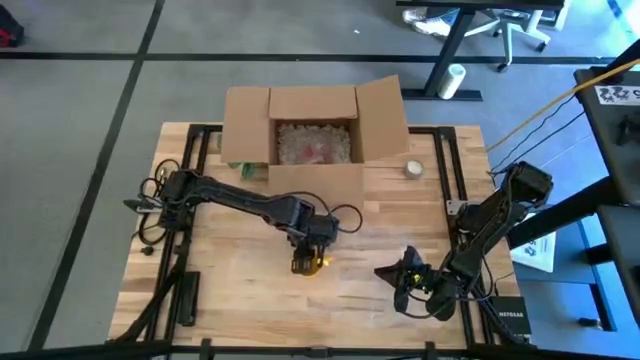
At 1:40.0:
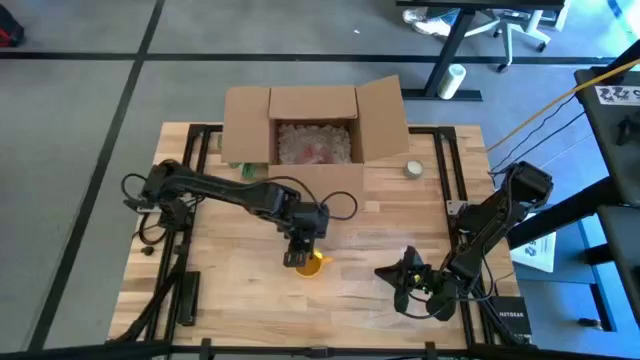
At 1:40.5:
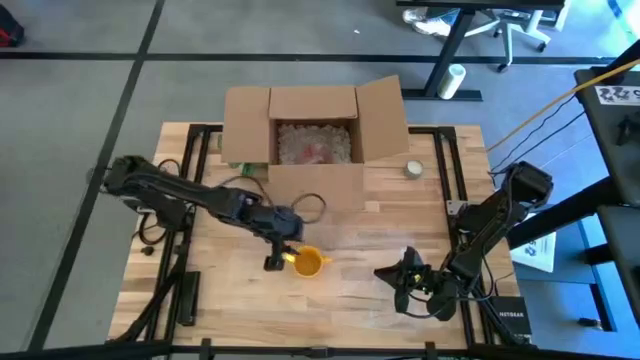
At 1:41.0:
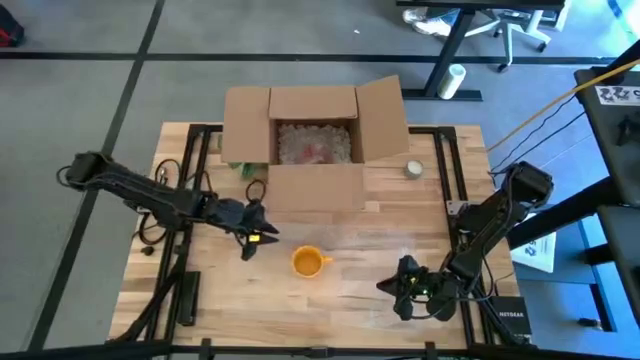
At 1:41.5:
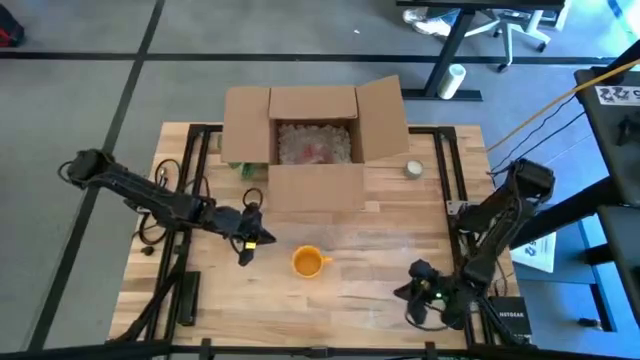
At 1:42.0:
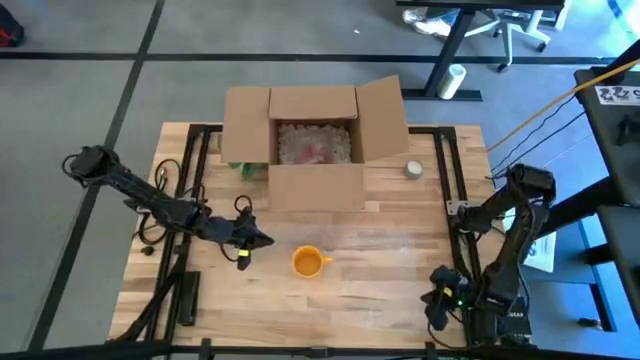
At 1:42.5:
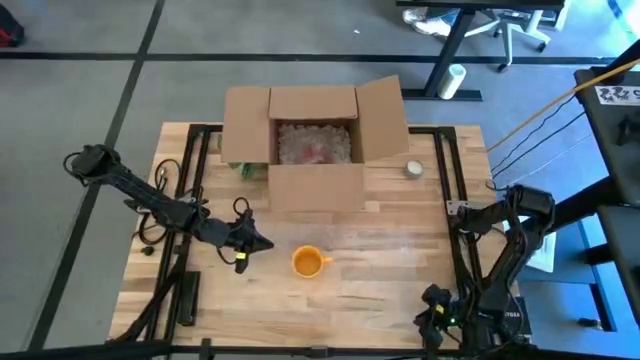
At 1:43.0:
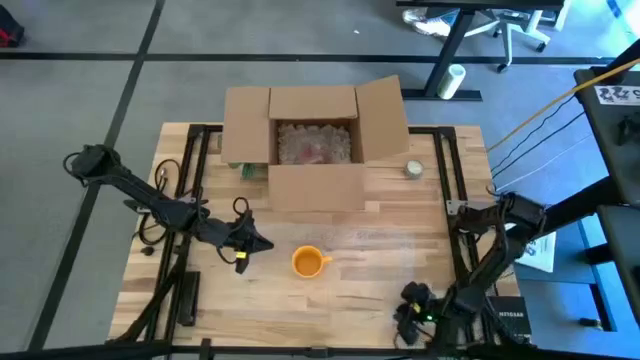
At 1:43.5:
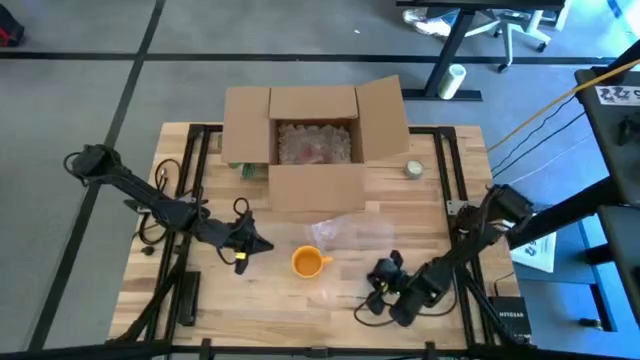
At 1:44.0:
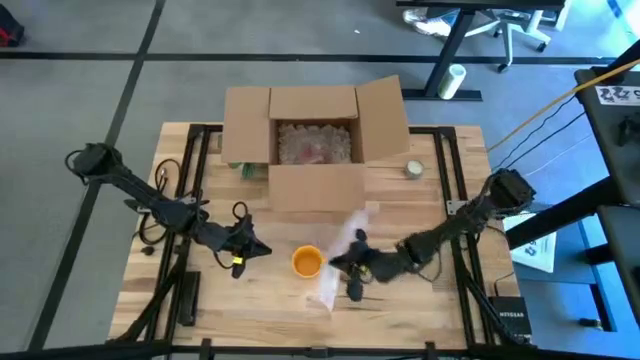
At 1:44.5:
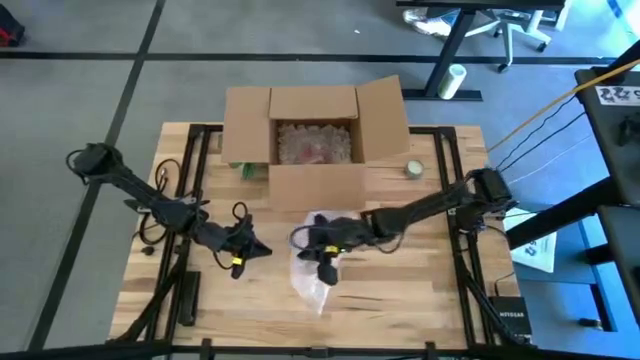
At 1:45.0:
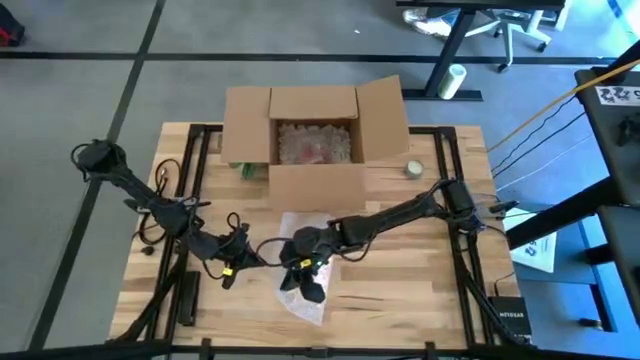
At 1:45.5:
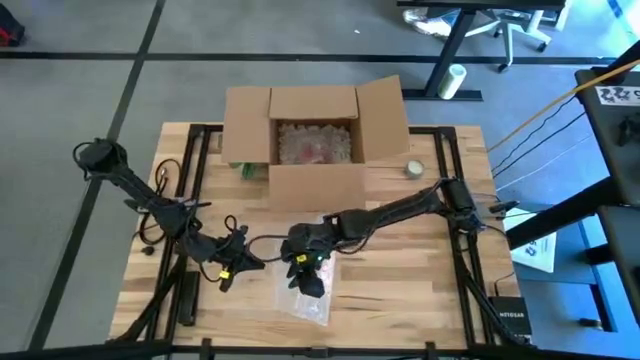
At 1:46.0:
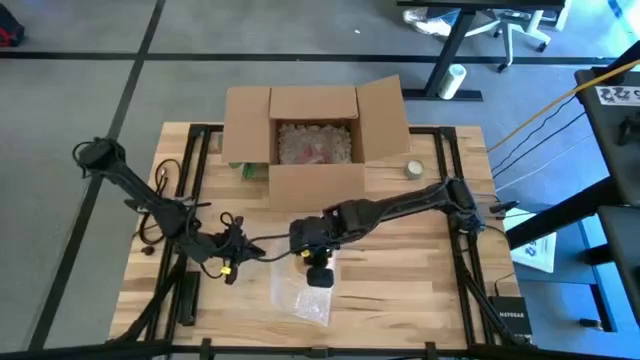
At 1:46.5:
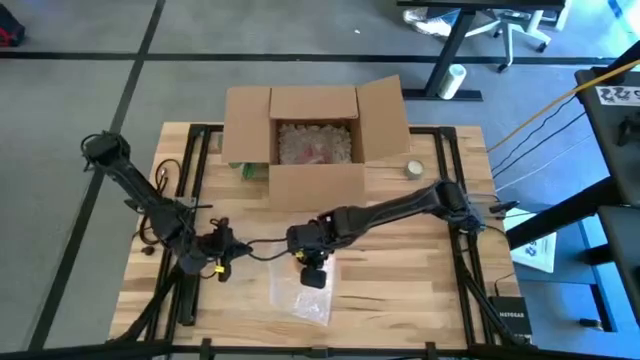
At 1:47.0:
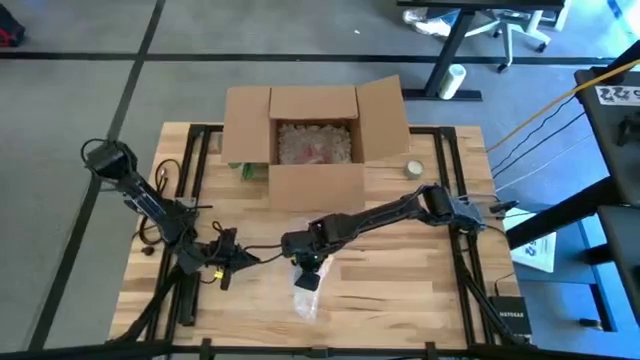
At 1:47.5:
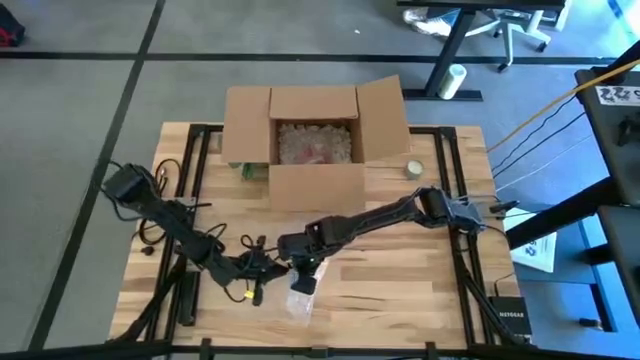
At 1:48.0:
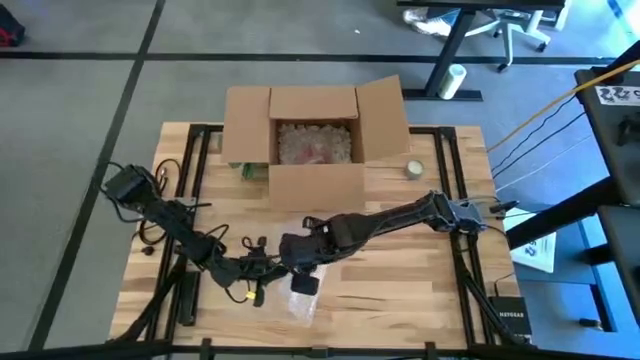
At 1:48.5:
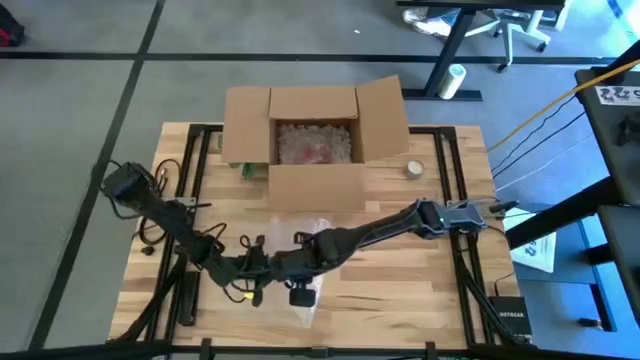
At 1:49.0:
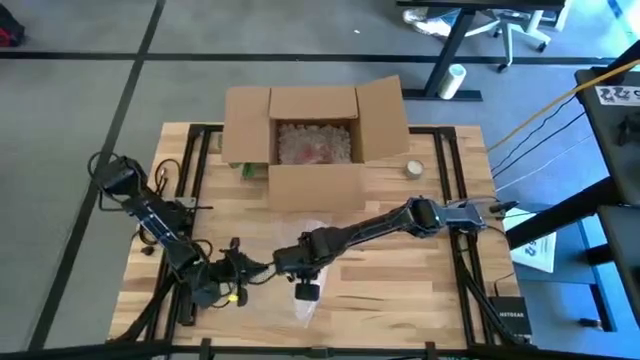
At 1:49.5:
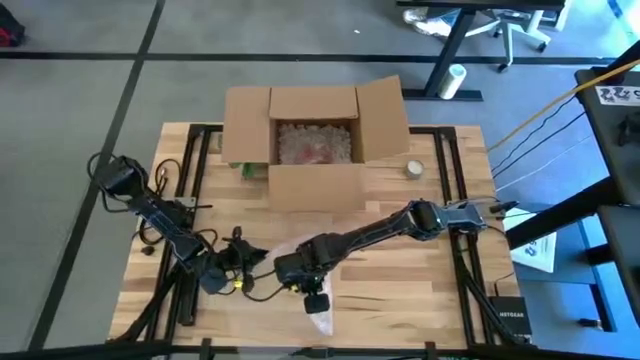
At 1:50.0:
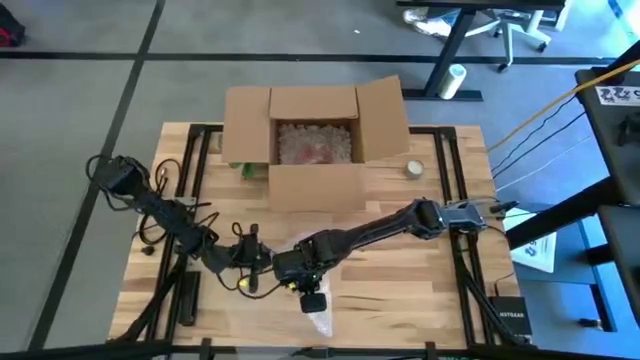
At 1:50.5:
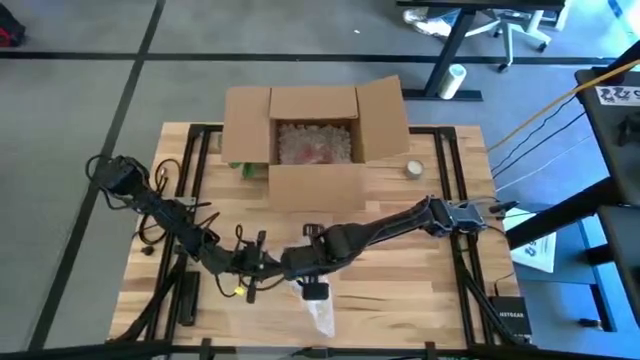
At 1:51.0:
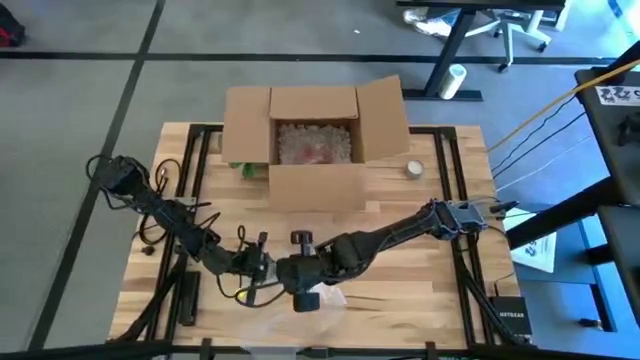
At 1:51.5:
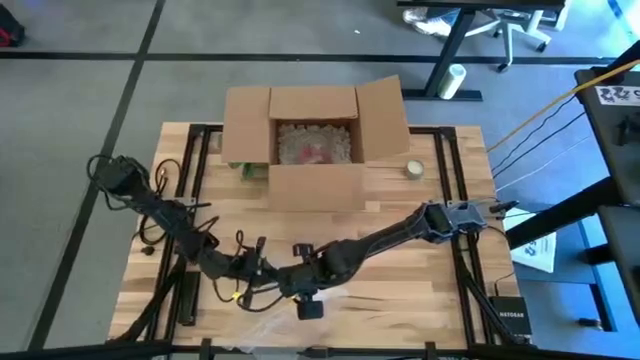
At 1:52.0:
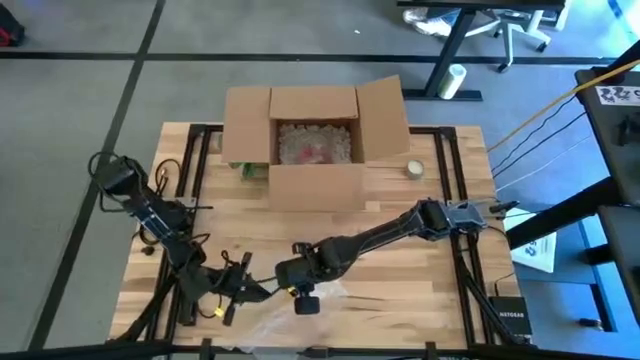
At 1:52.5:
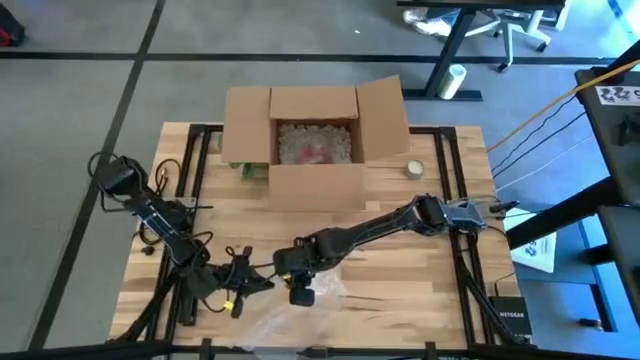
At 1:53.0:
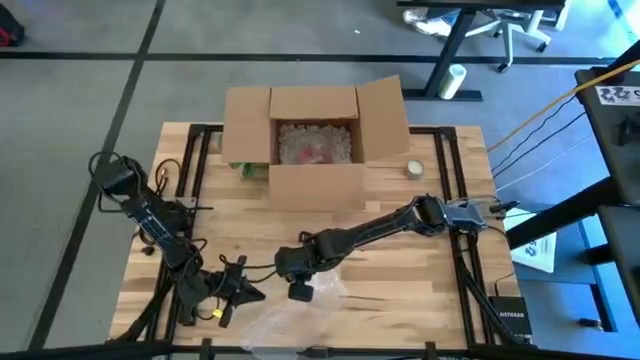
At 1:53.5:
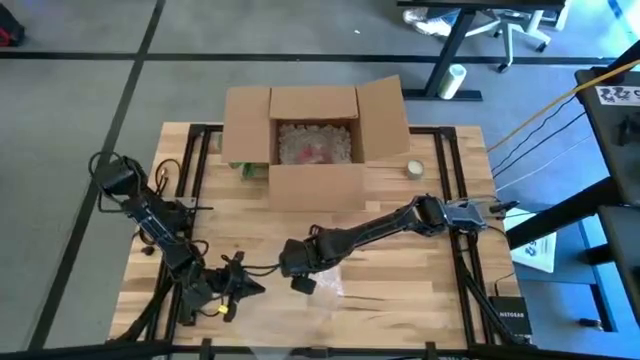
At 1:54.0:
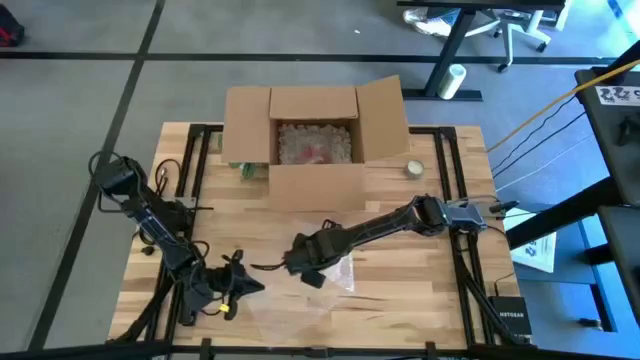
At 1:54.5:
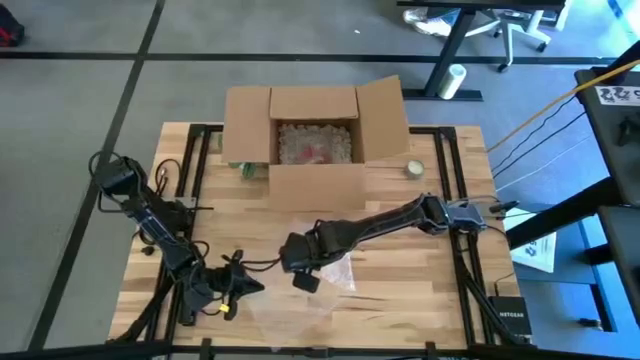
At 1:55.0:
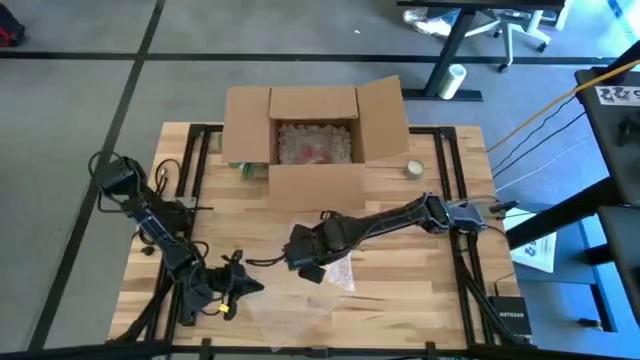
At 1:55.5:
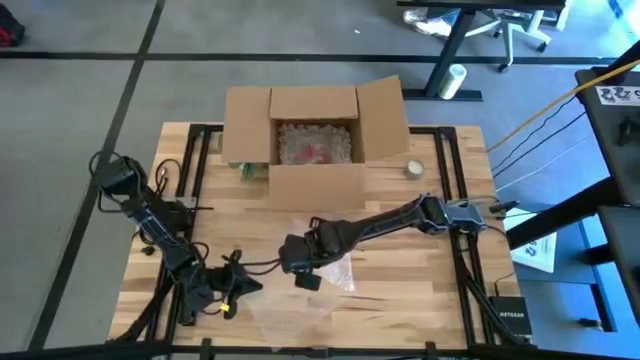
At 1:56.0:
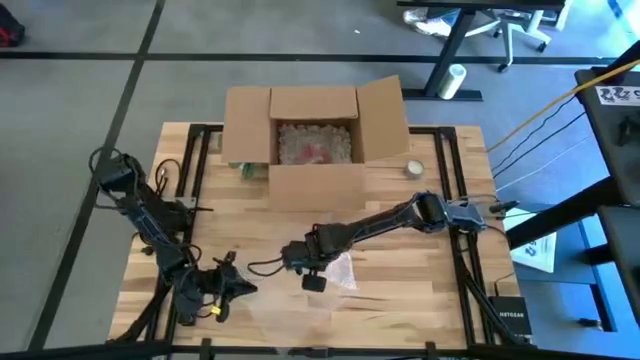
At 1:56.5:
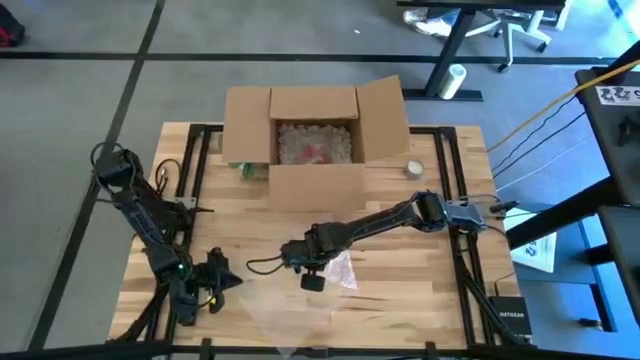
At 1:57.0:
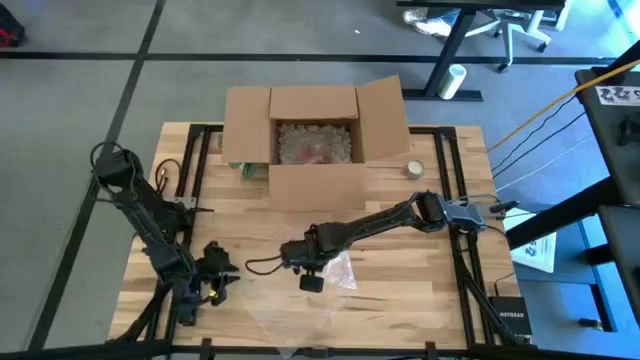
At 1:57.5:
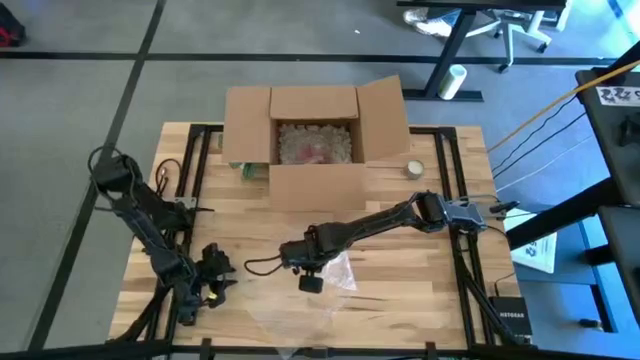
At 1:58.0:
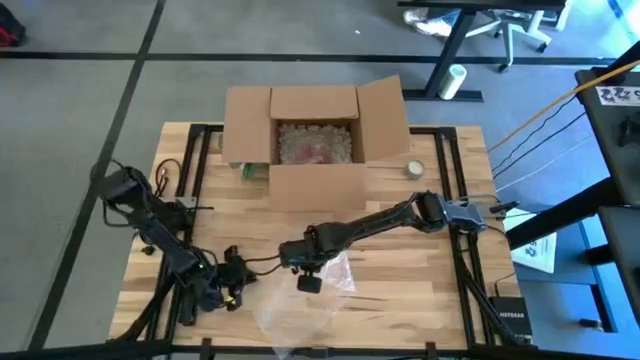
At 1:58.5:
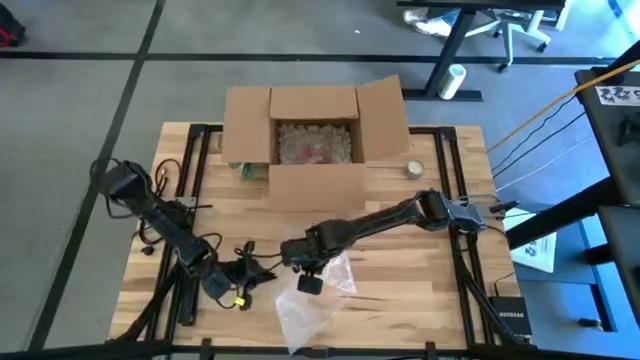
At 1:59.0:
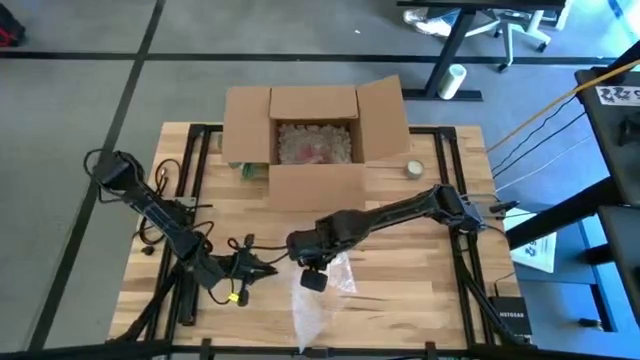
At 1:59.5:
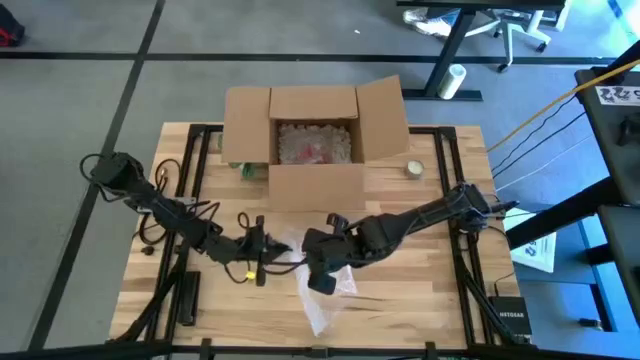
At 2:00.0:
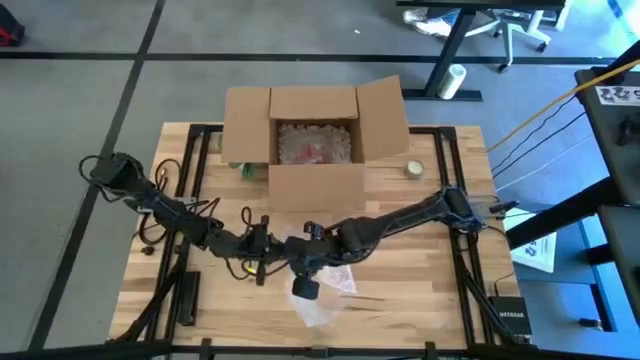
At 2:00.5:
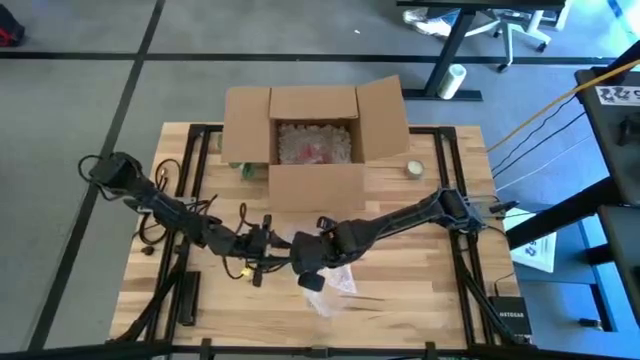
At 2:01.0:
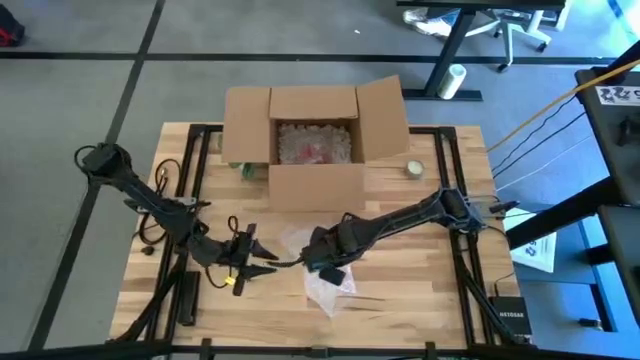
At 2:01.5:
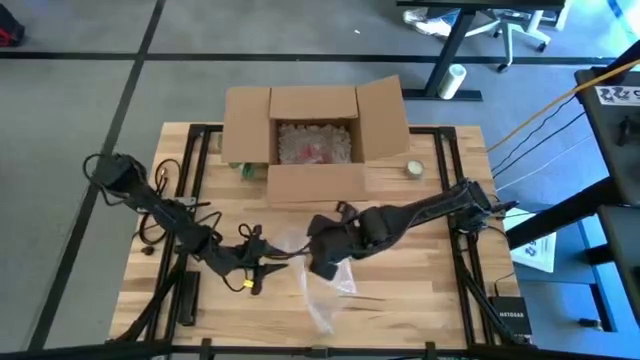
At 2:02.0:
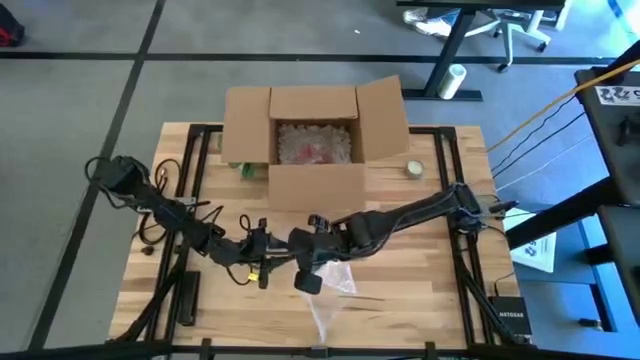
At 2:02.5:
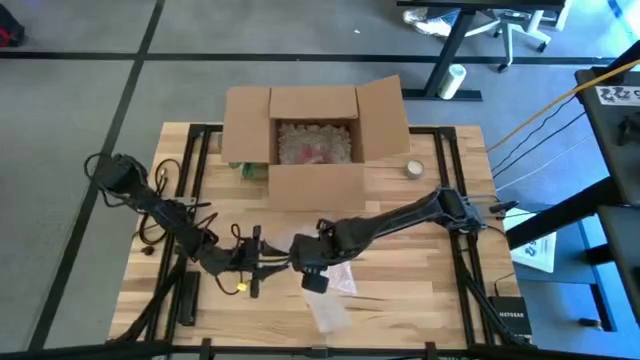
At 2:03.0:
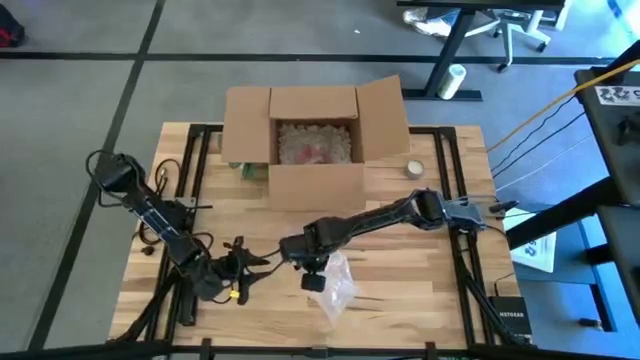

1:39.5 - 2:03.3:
Task: wrap mug
Wrap the yellow cup with bubble wrap
